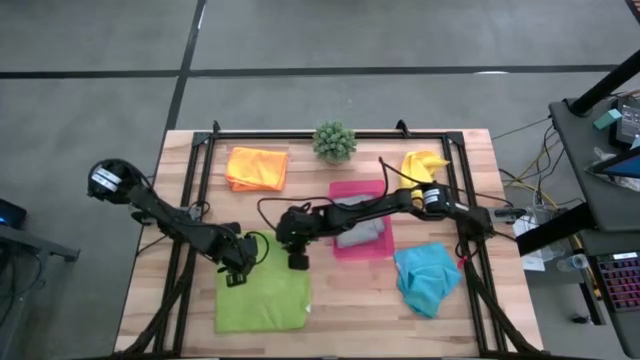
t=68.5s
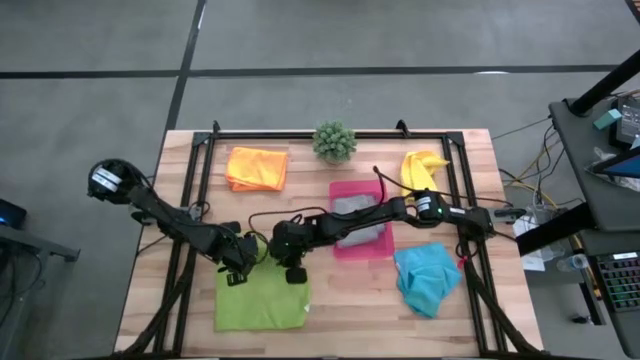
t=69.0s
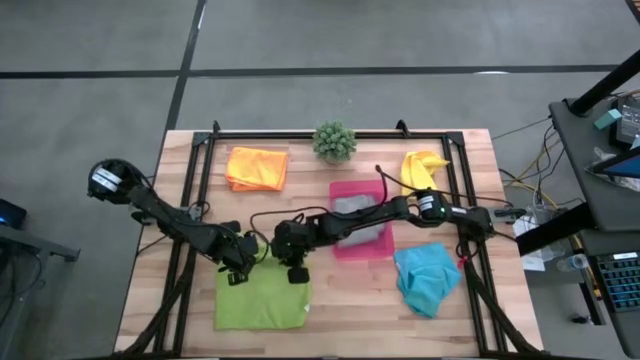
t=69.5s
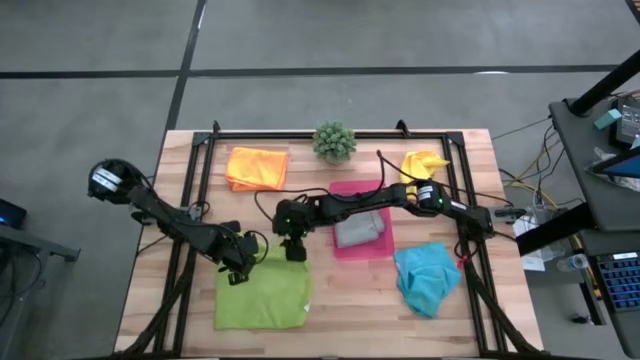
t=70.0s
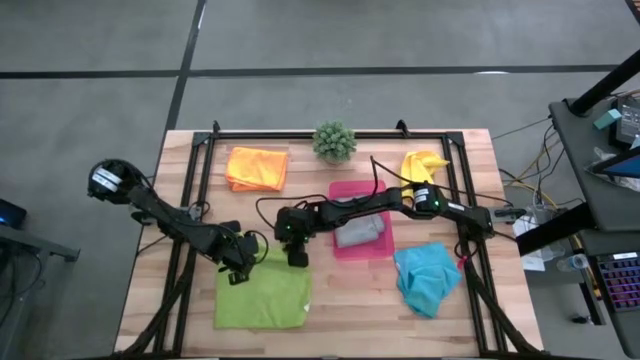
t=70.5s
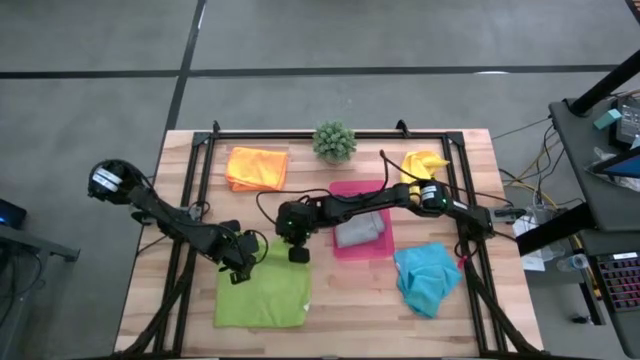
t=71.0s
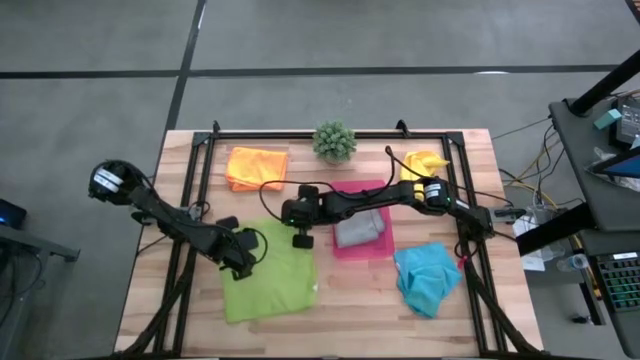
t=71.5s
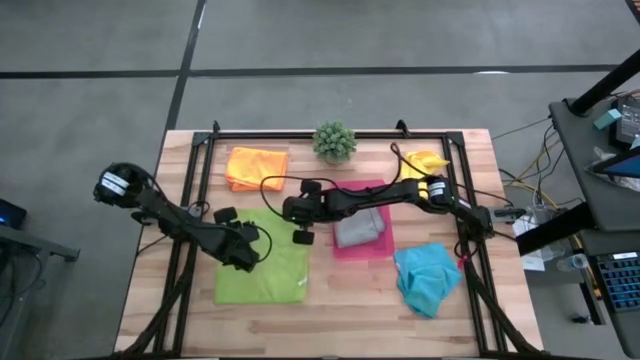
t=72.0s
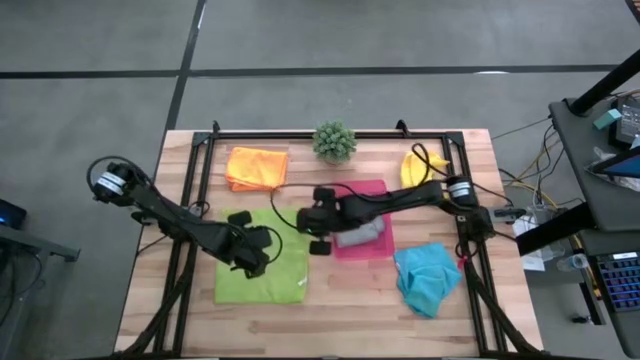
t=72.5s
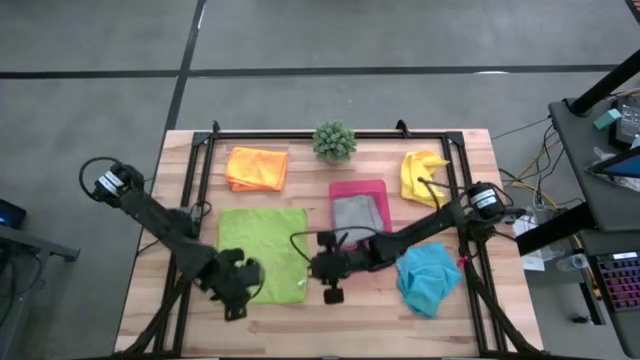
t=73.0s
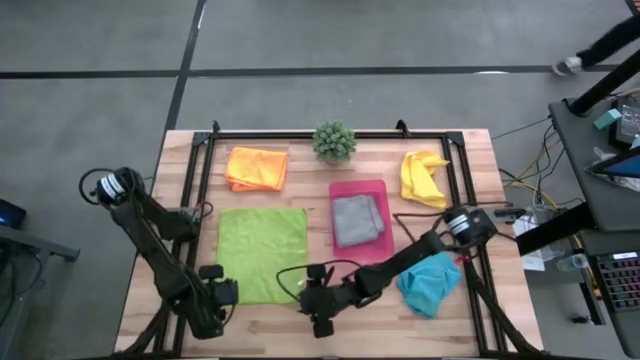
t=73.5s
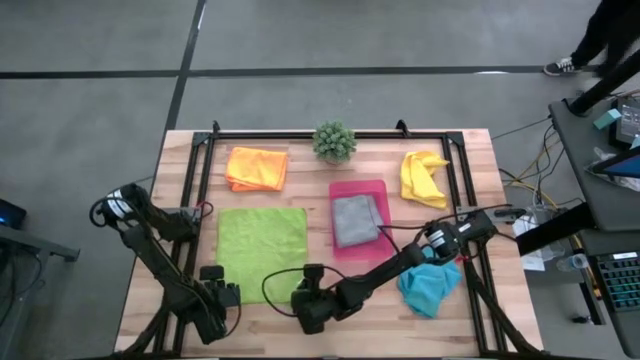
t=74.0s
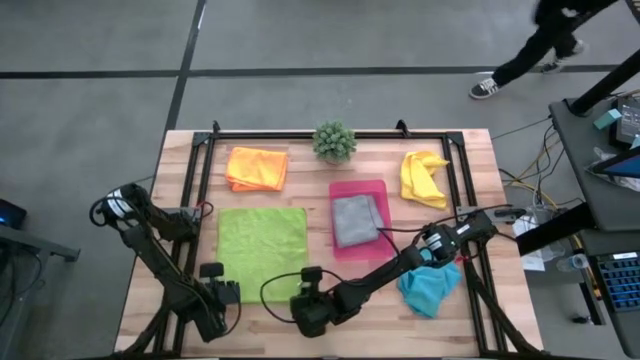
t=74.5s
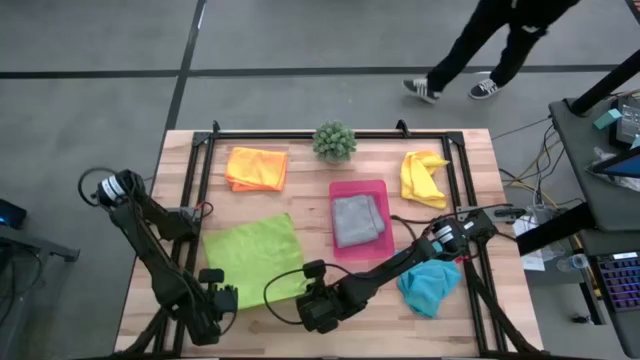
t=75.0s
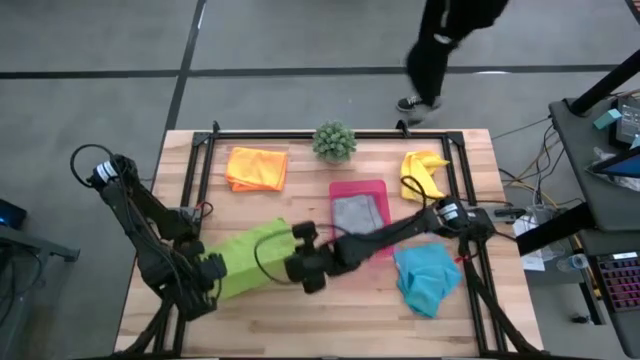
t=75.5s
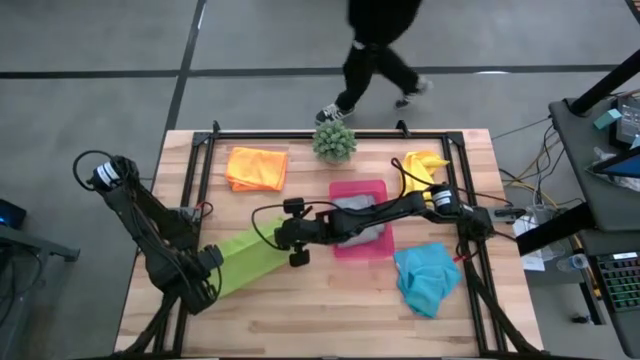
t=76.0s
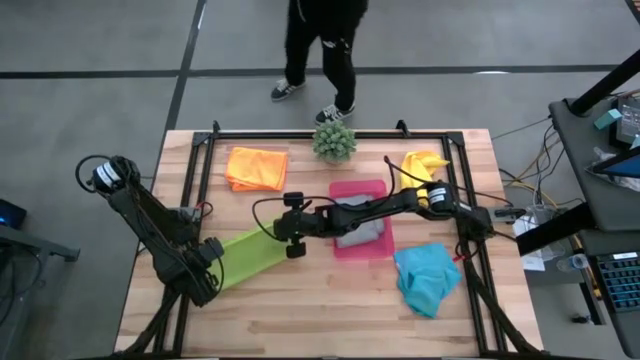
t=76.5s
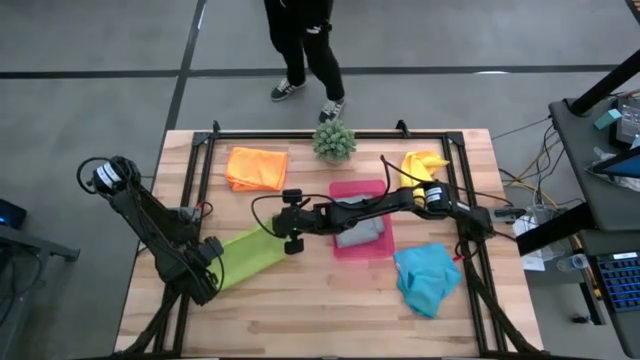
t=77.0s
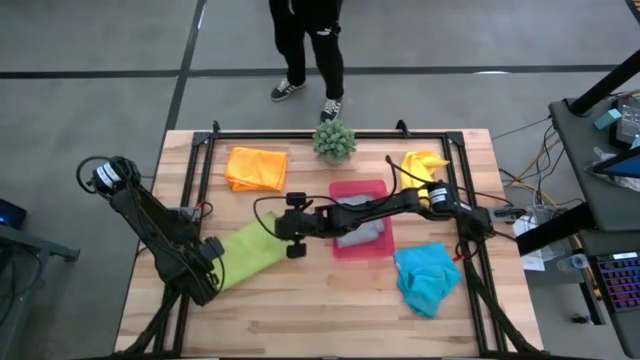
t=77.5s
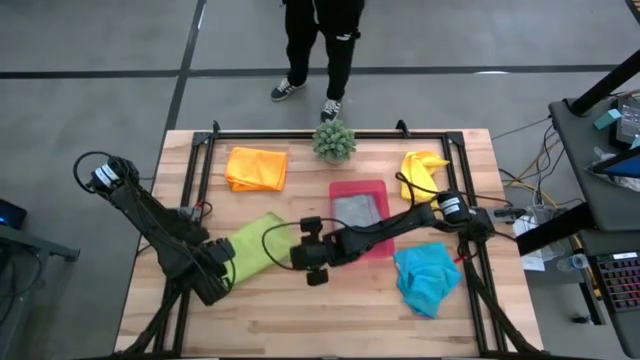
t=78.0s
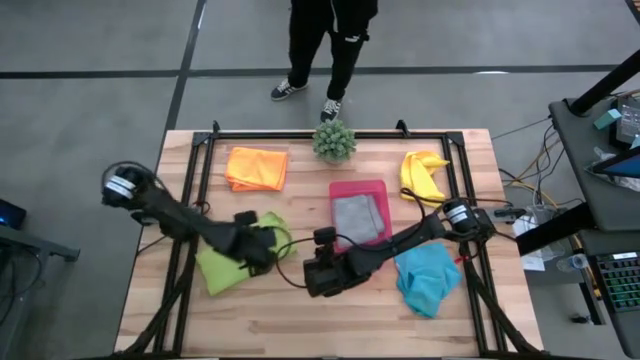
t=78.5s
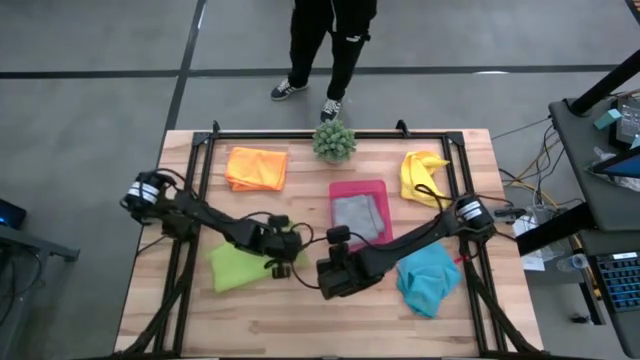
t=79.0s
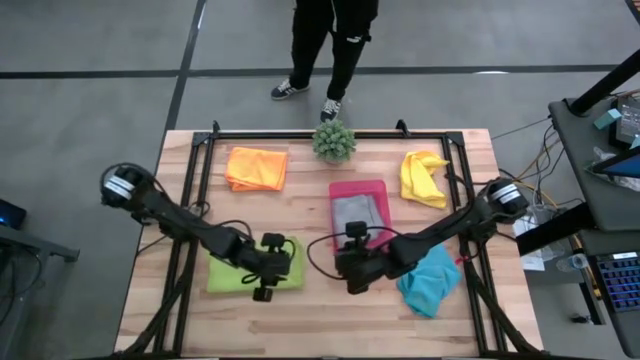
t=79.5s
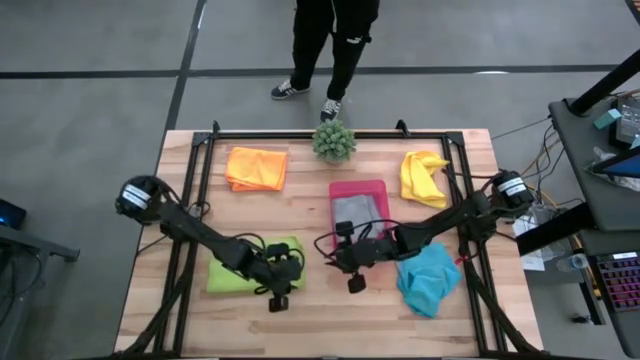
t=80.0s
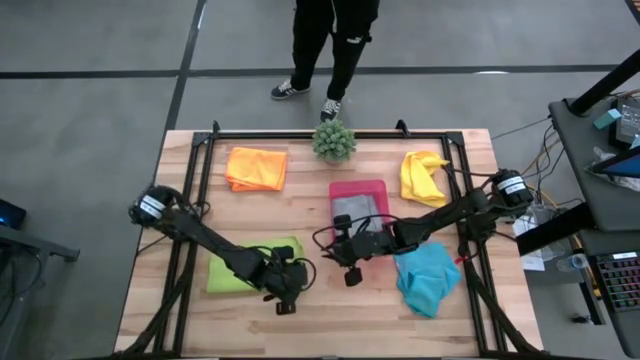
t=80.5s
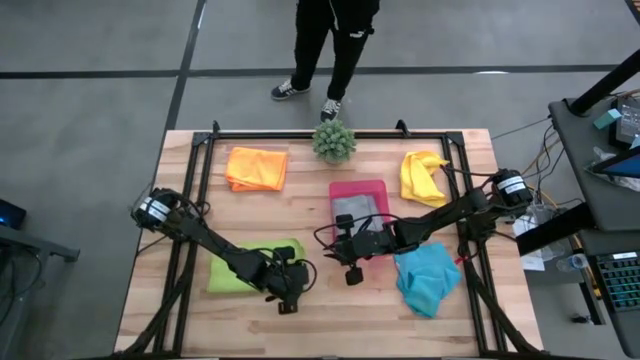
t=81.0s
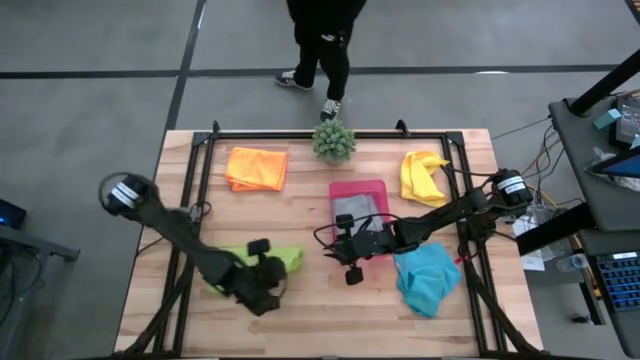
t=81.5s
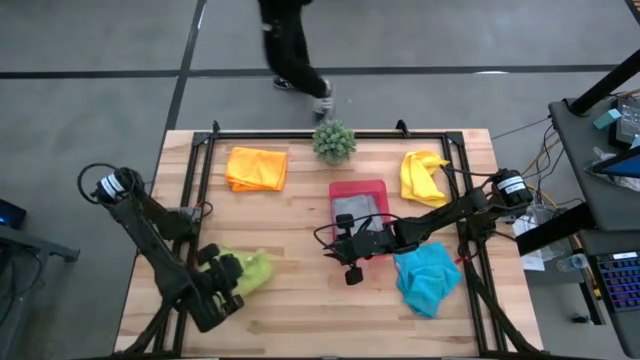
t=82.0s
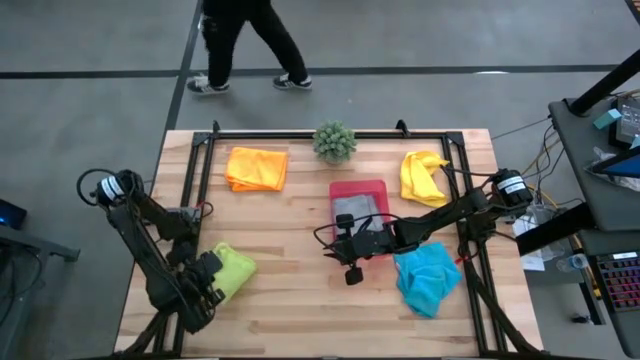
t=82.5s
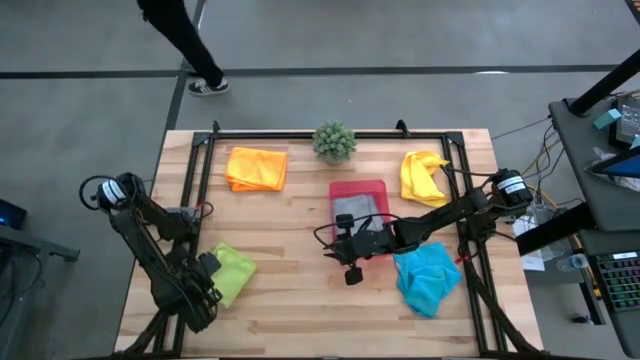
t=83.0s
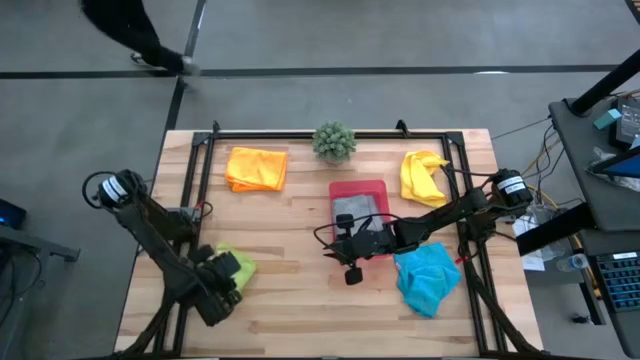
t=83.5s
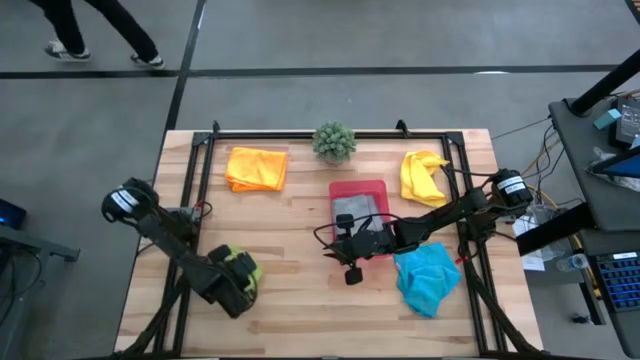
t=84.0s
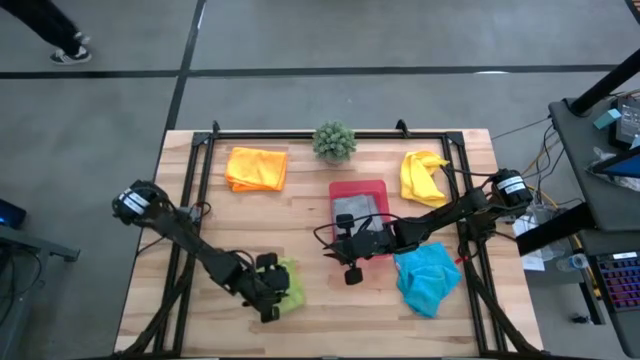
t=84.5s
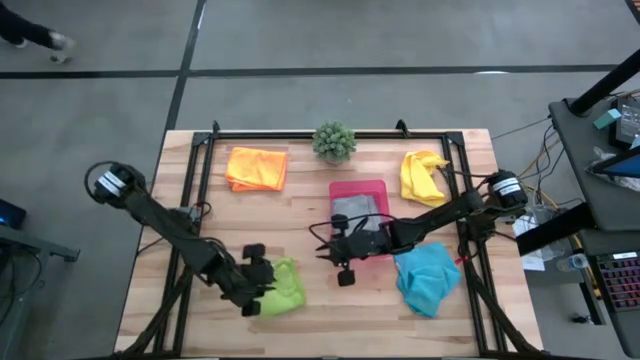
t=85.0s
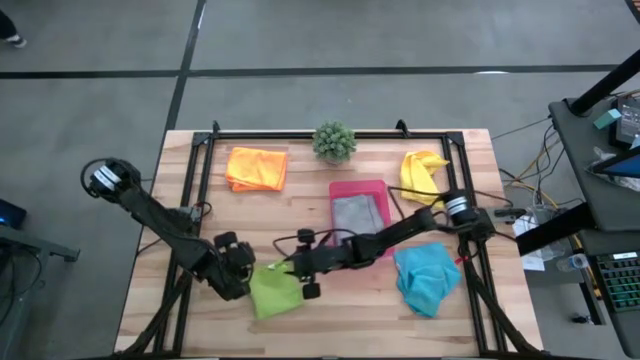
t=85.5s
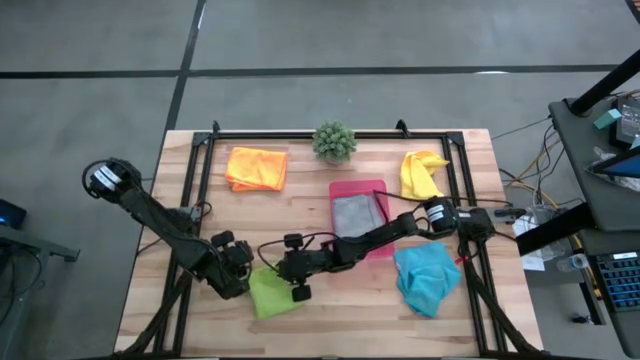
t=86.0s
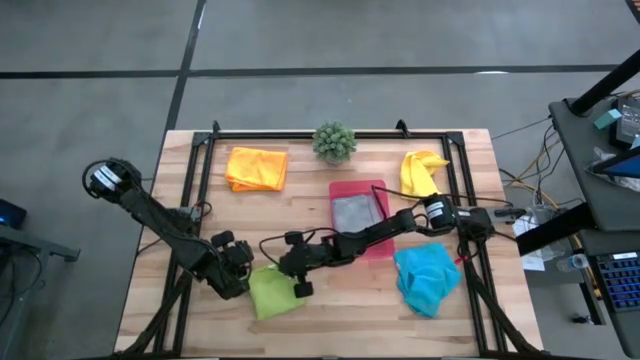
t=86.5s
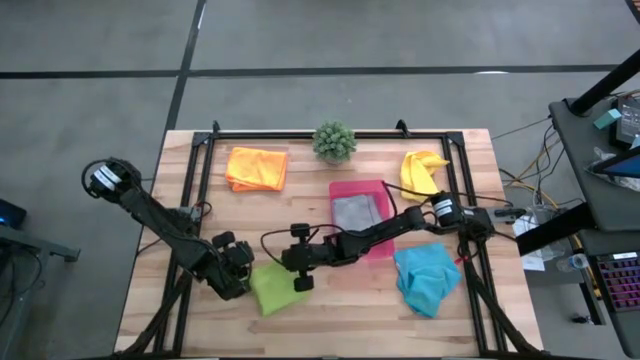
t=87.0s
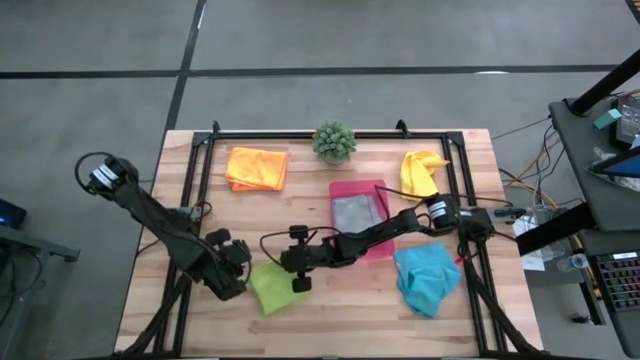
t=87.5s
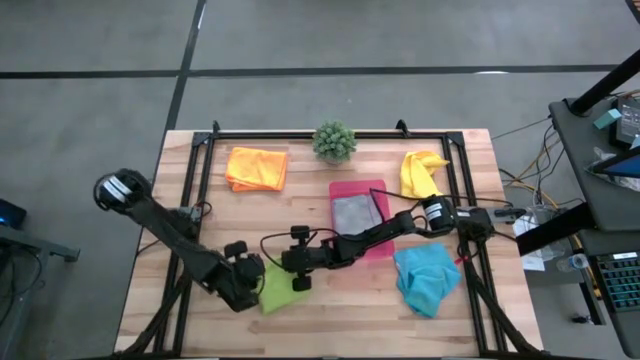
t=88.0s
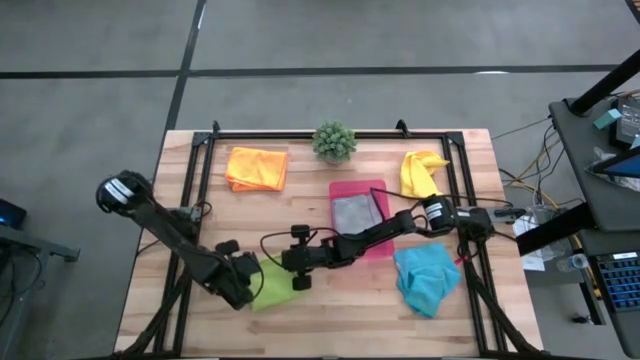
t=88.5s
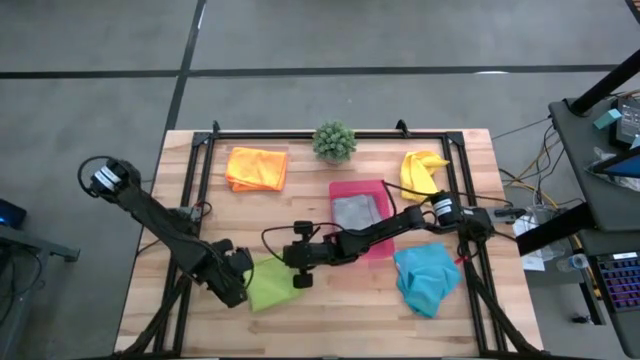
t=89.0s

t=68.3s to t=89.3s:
Task: Fold microfiber towels
Fold the green towel

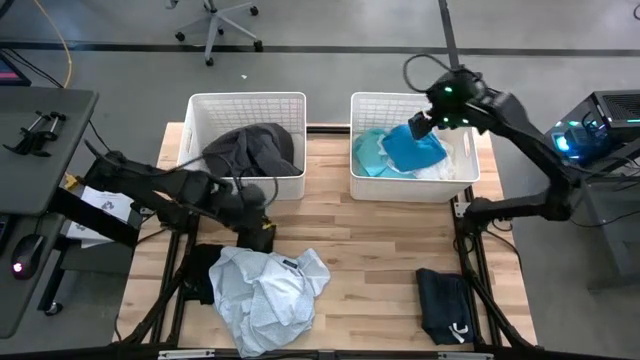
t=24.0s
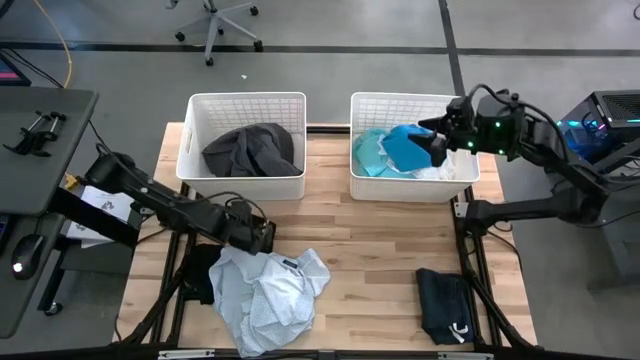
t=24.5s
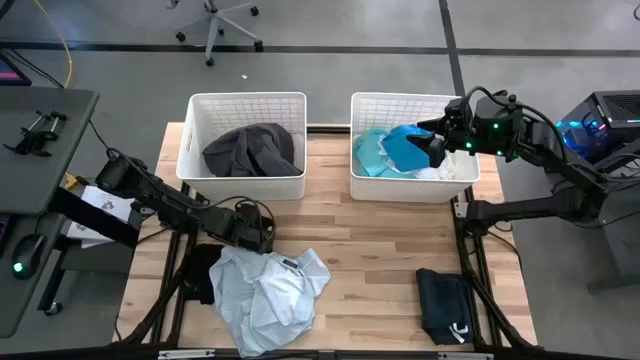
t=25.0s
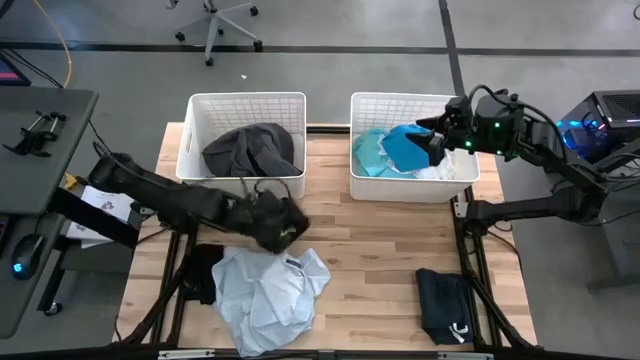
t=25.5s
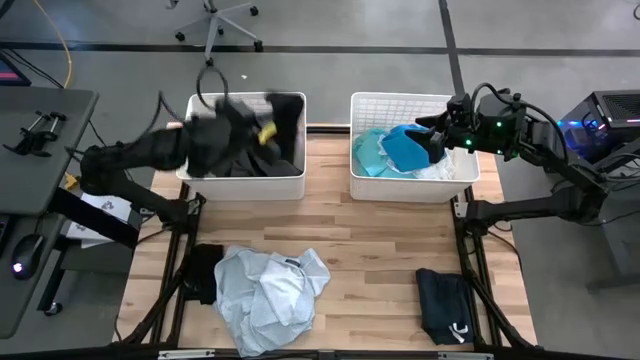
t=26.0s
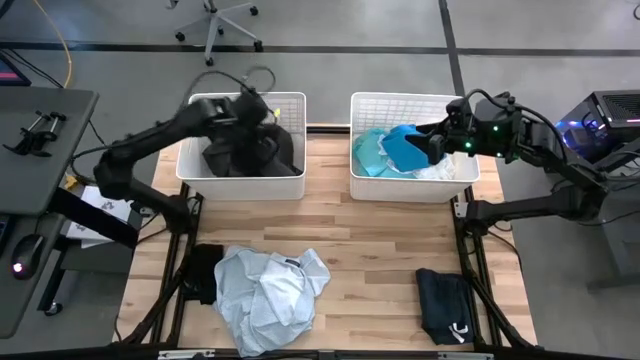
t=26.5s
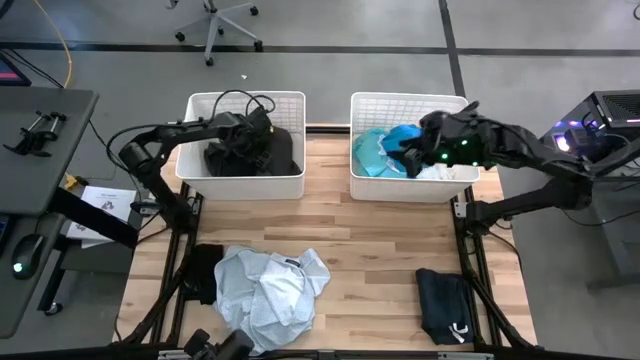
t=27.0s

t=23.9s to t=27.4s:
Task: Sort clothes
Put the black boxer into the left white bin
